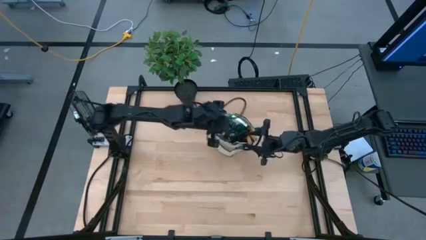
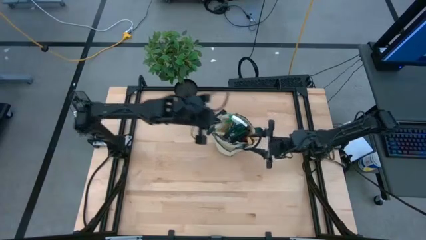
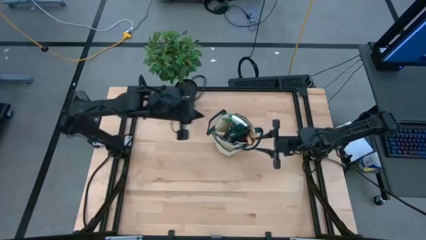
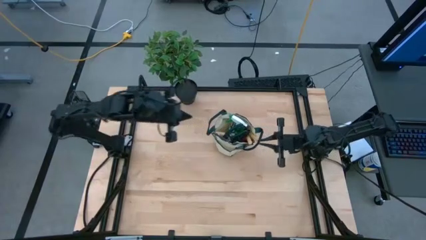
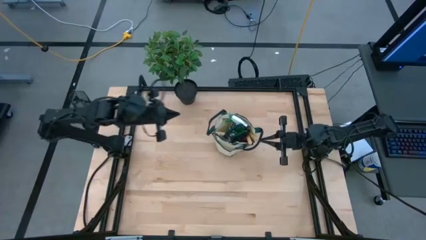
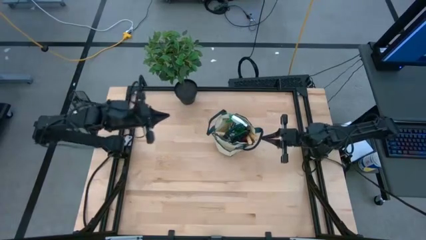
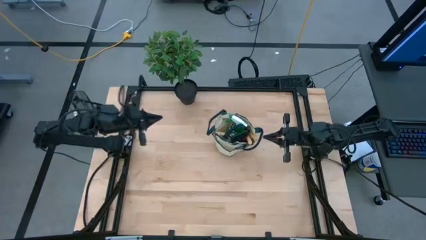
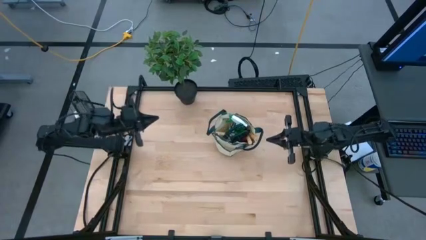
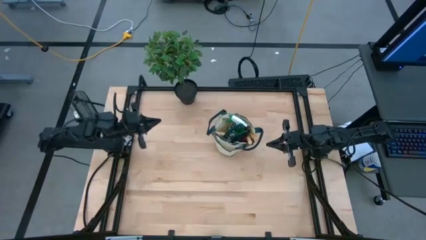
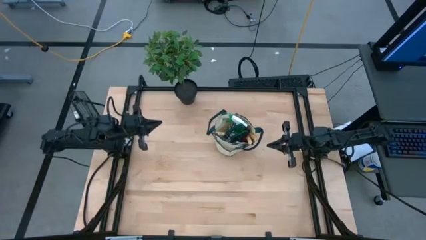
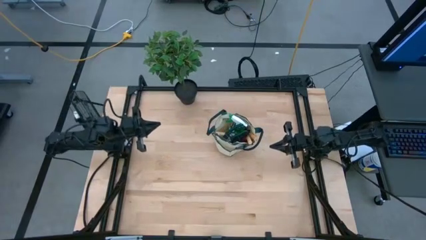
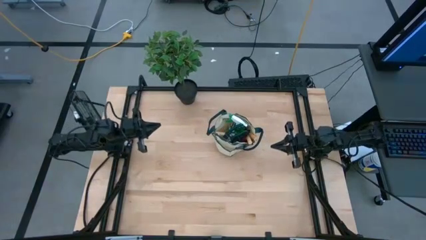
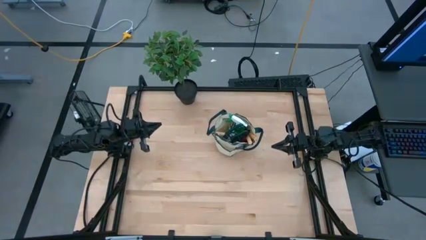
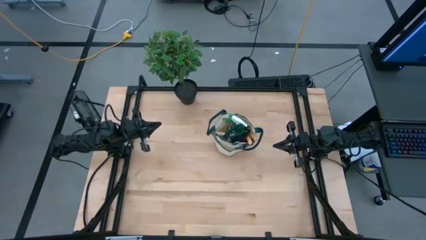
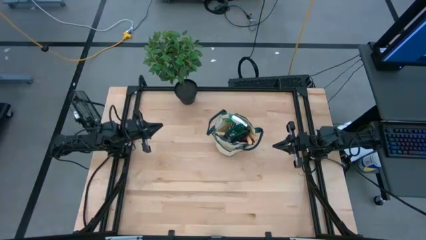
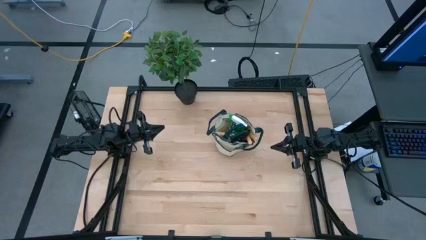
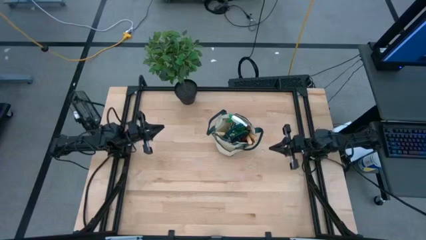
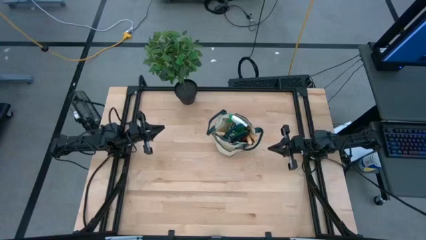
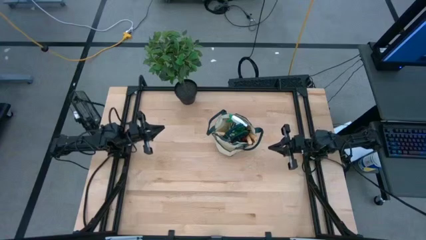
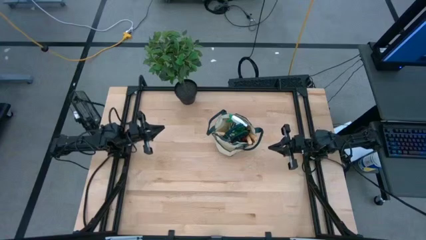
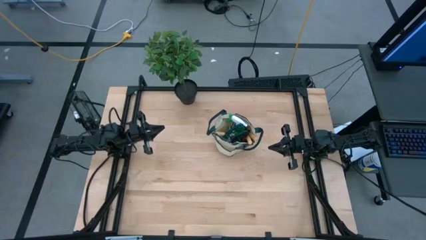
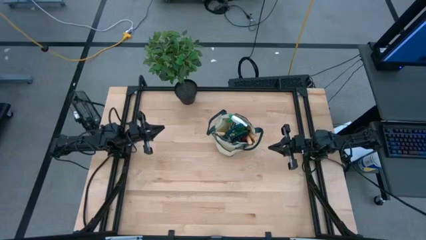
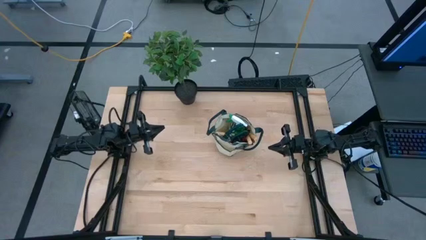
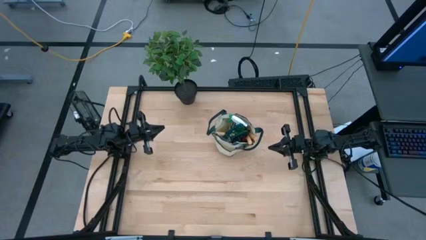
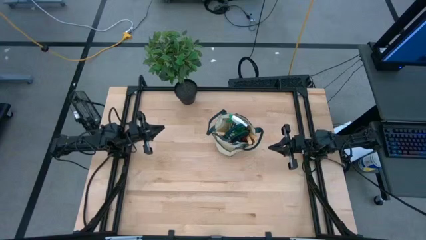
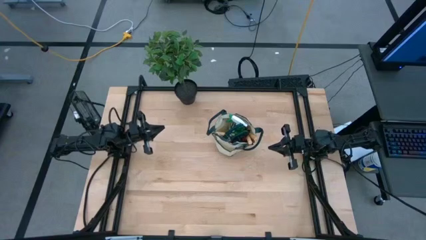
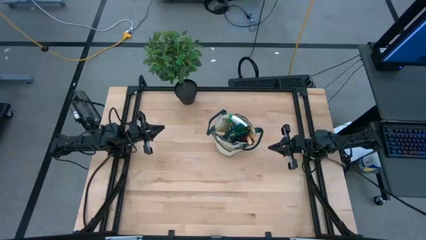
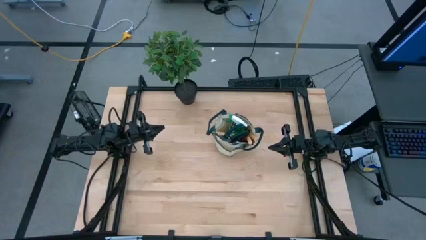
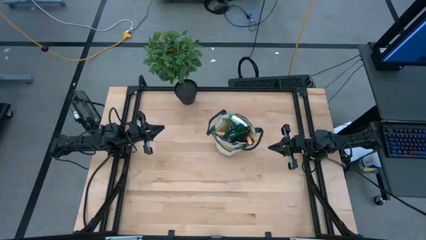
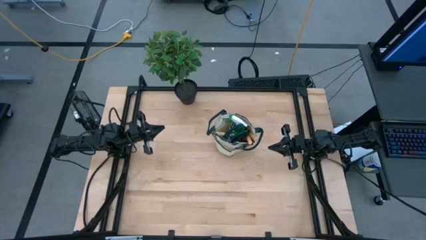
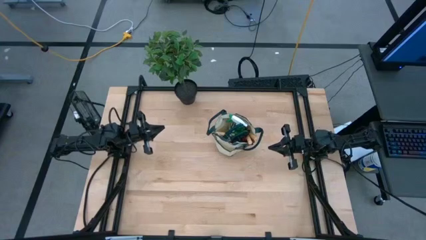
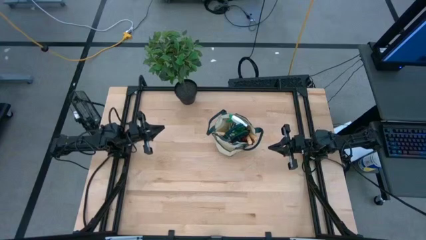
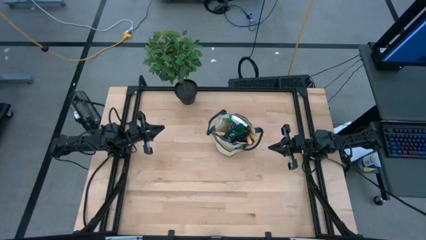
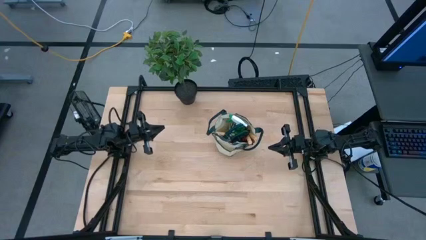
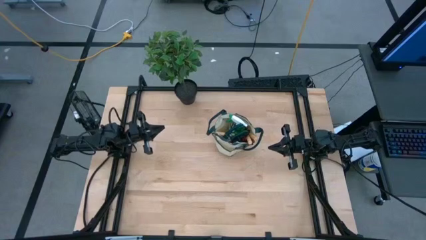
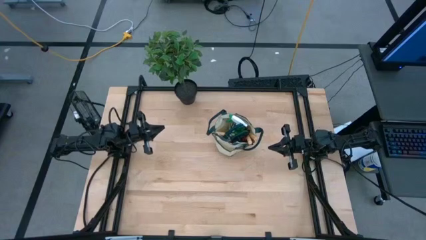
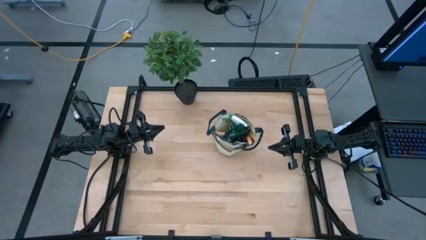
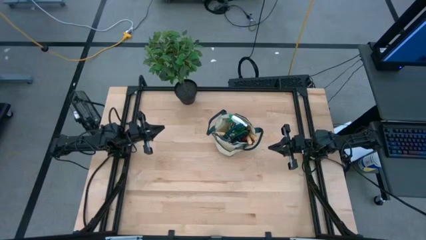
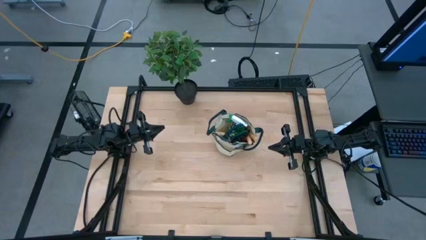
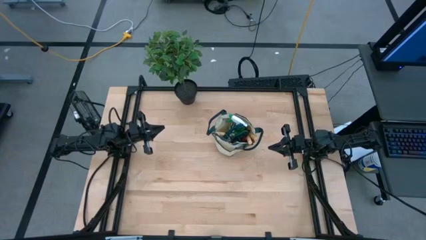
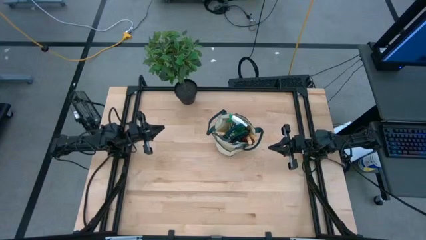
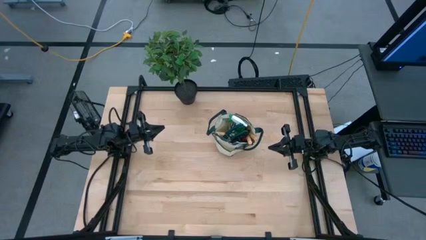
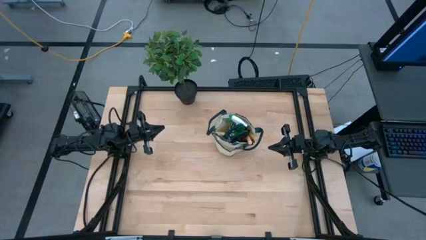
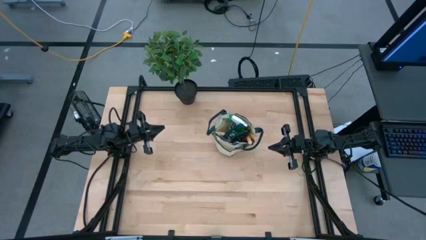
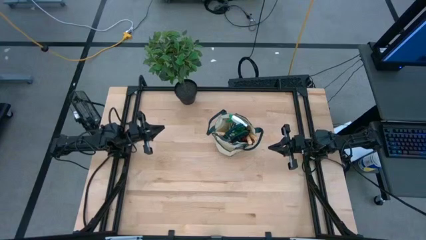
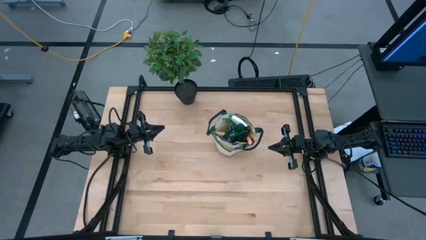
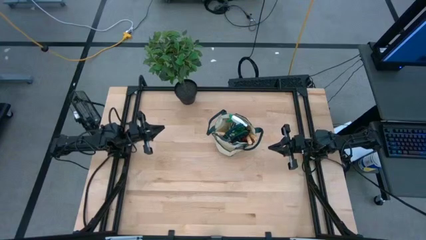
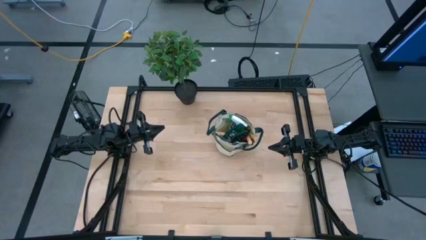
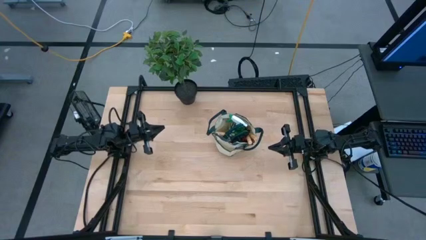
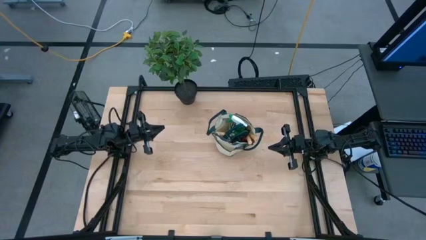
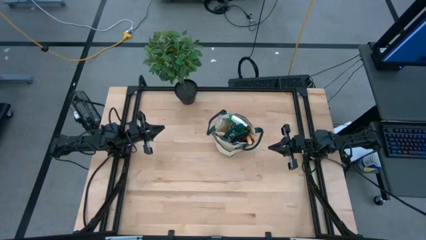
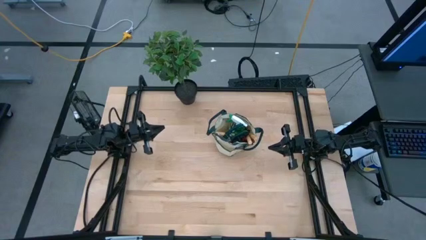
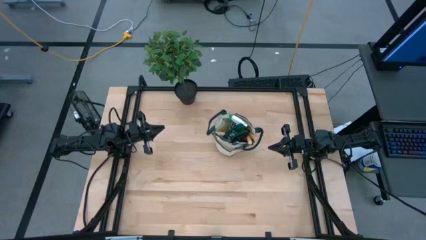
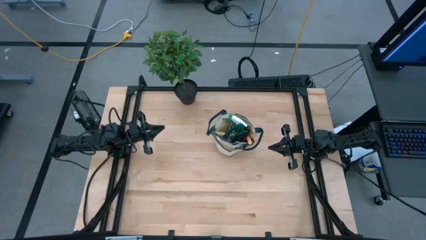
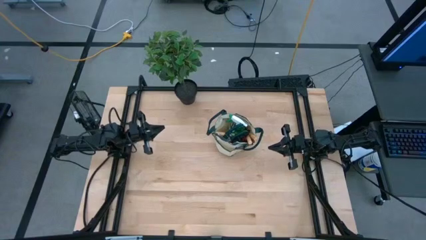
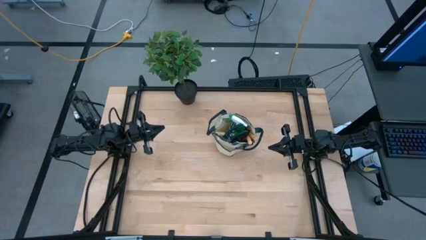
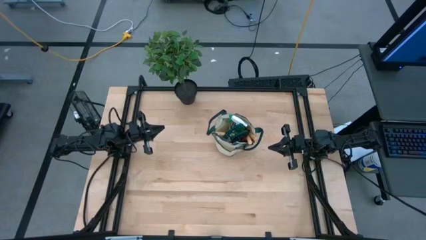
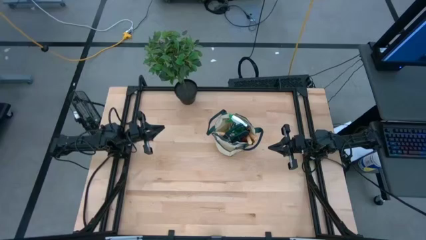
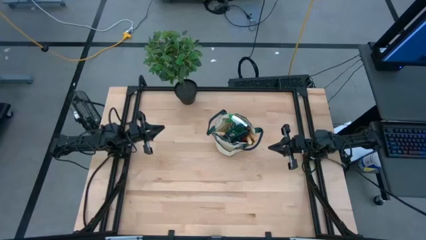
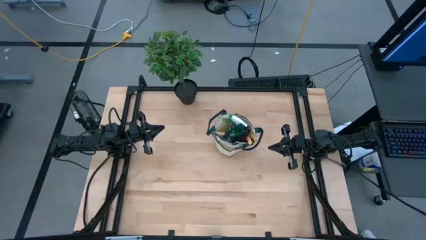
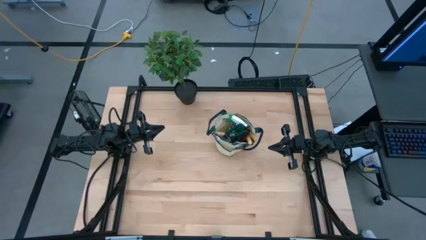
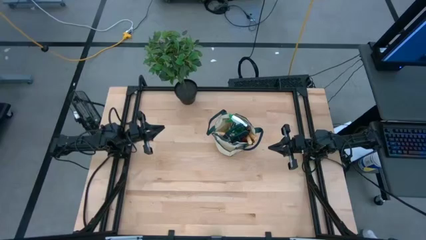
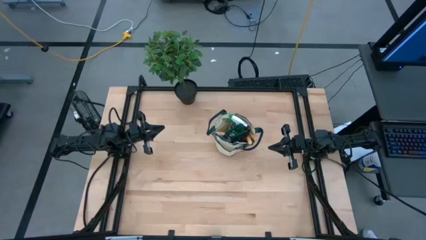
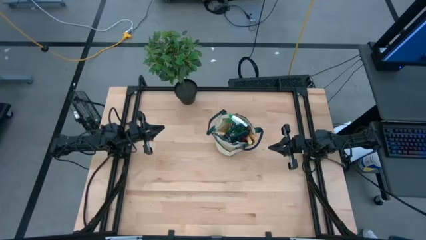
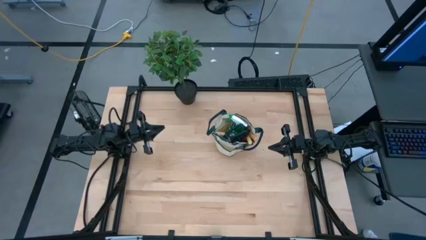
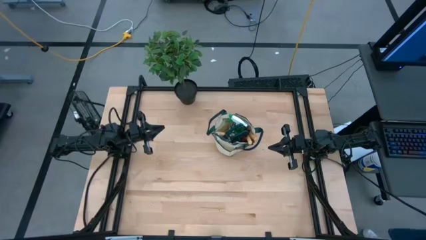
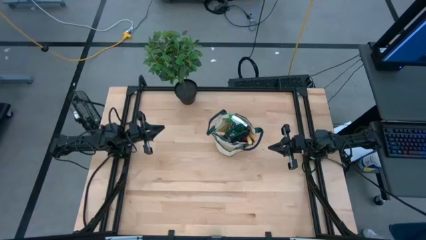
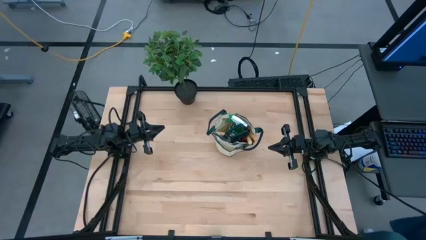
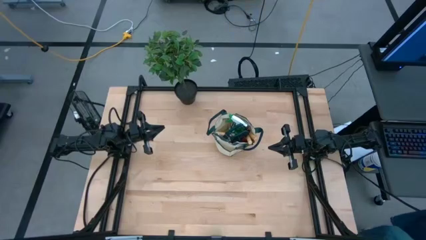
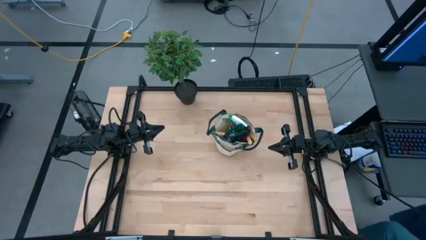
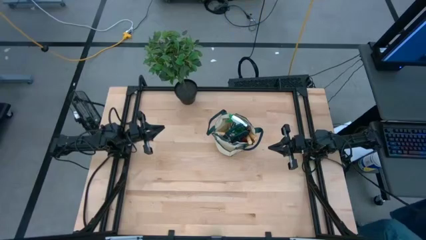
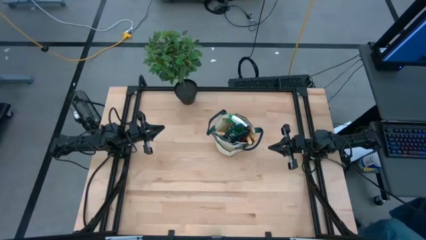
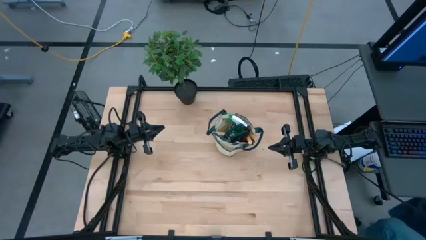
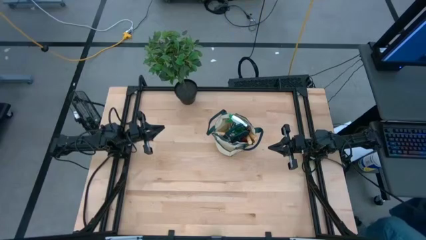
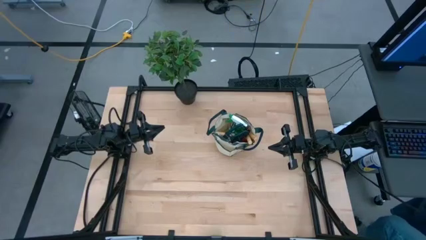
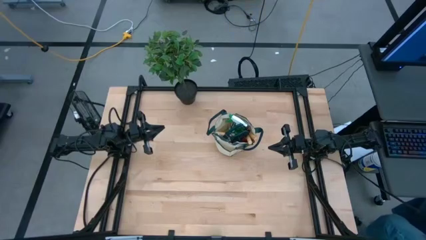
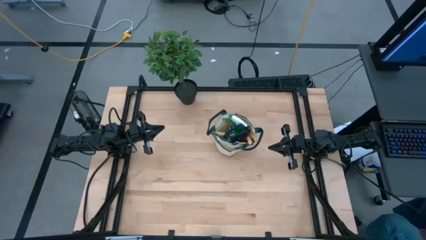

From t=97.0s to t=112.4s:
Task: Pick & Place Garden tools in Gardening bag
Return to Home Position
